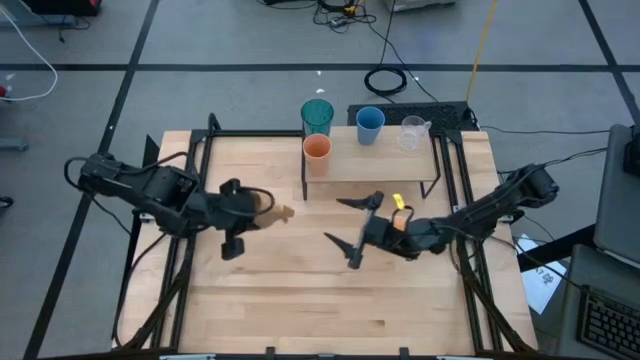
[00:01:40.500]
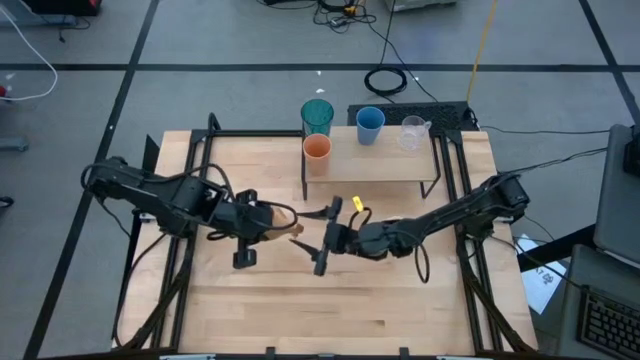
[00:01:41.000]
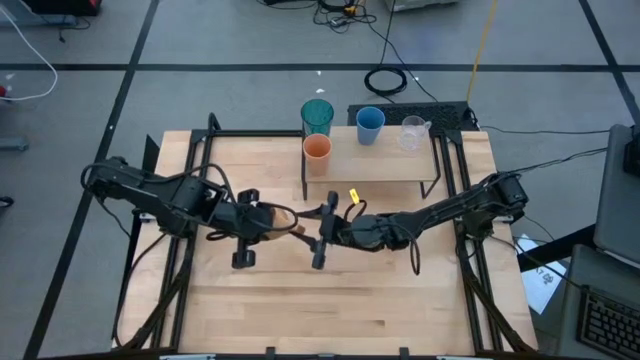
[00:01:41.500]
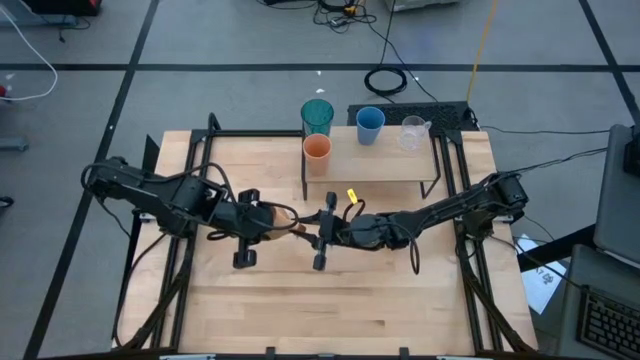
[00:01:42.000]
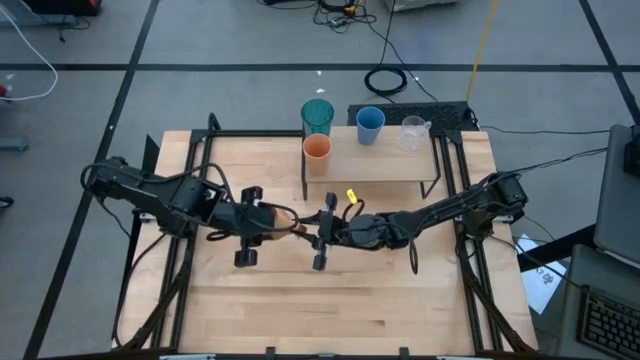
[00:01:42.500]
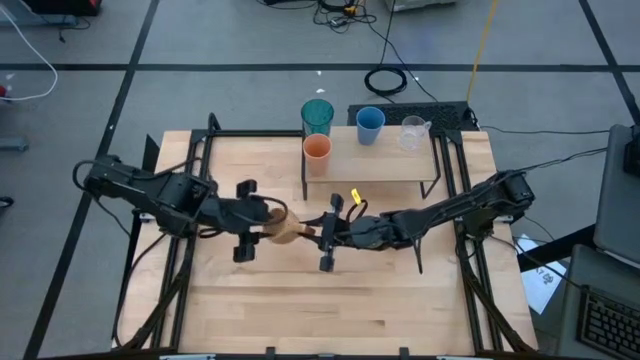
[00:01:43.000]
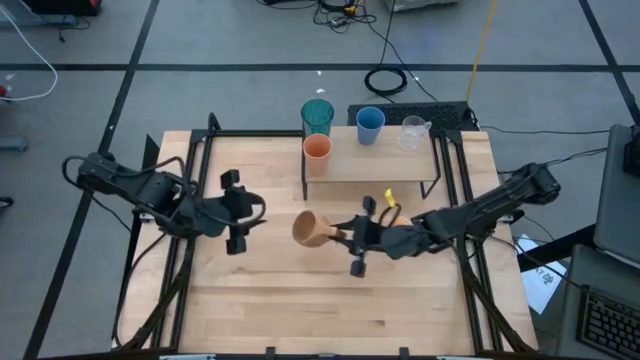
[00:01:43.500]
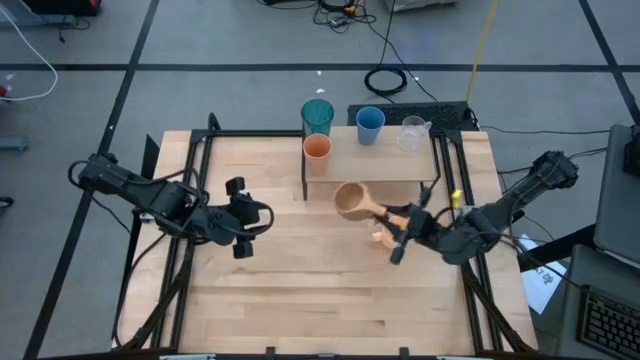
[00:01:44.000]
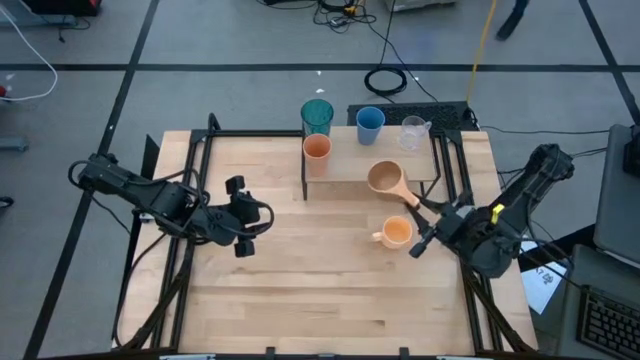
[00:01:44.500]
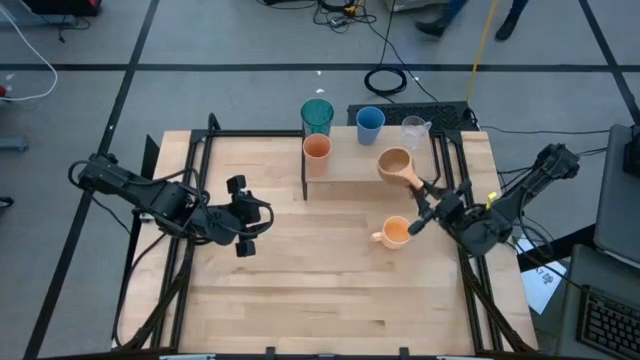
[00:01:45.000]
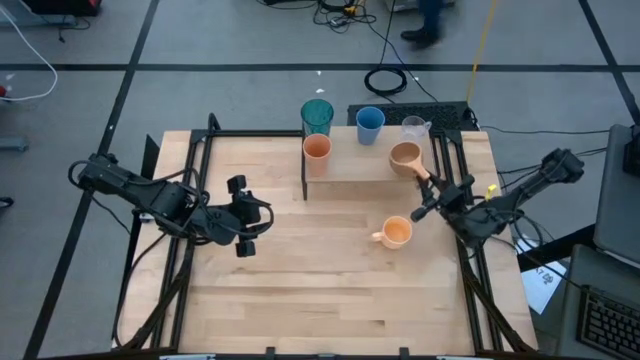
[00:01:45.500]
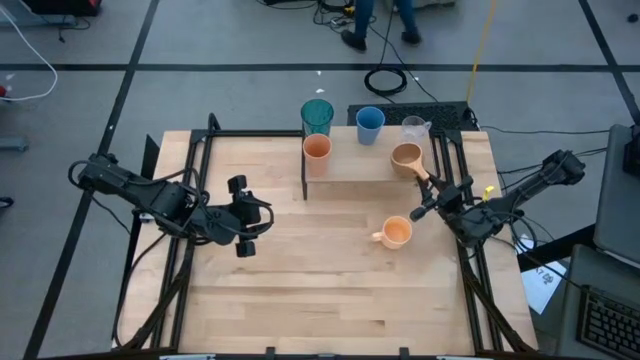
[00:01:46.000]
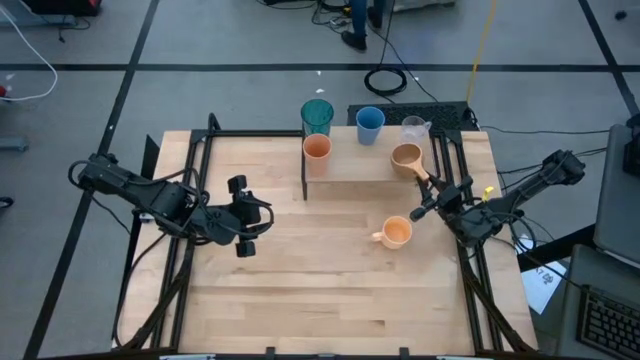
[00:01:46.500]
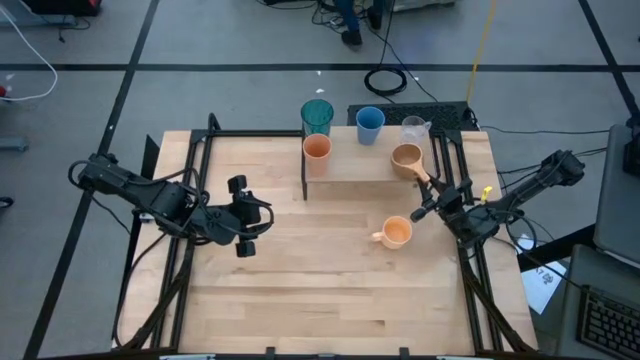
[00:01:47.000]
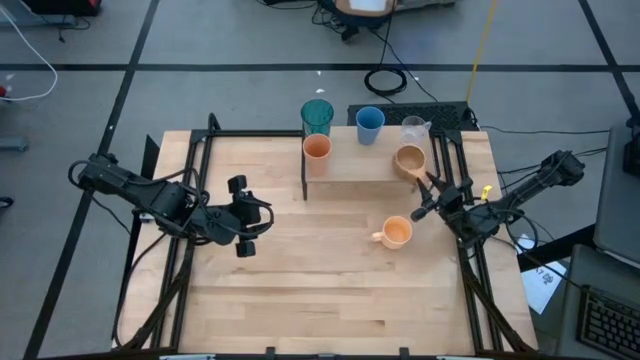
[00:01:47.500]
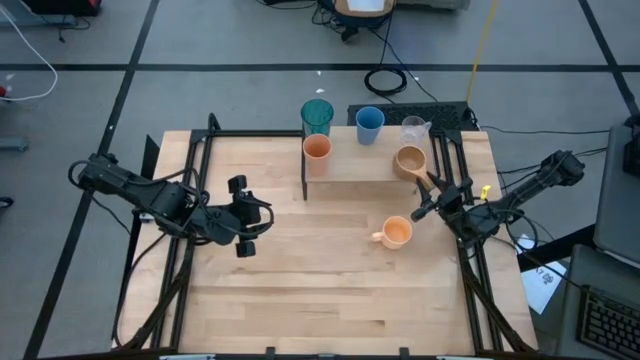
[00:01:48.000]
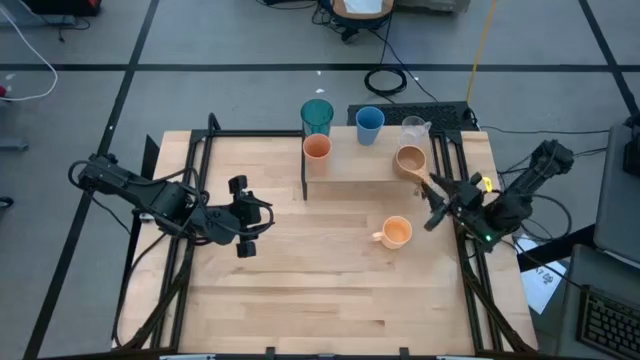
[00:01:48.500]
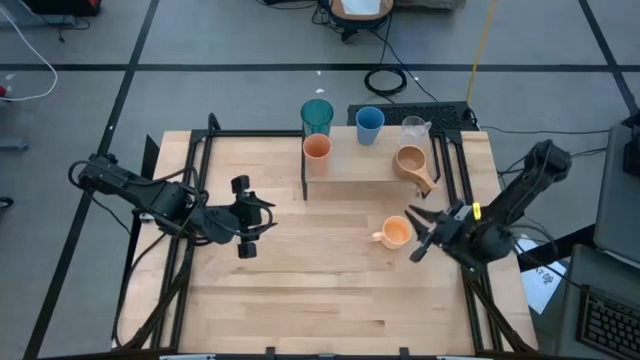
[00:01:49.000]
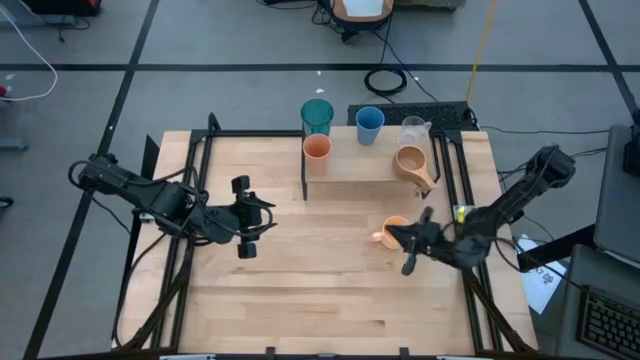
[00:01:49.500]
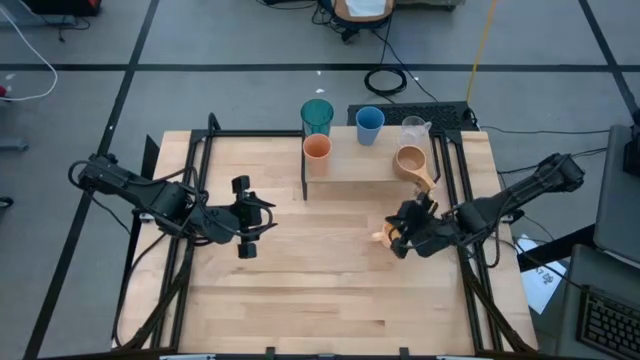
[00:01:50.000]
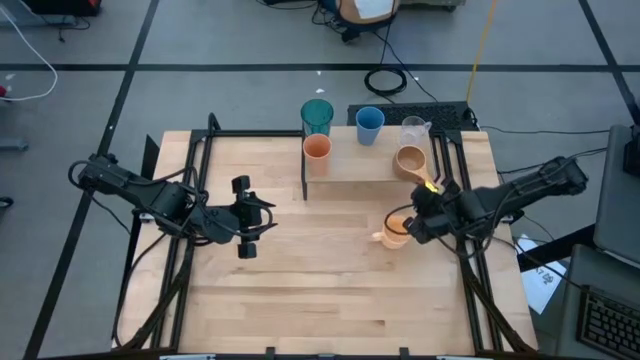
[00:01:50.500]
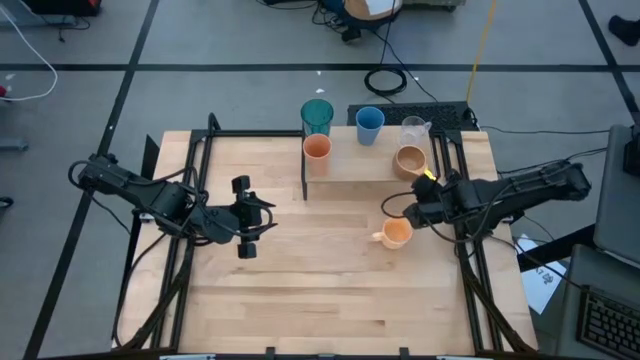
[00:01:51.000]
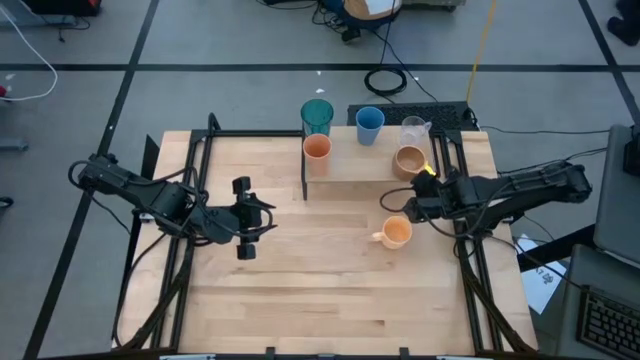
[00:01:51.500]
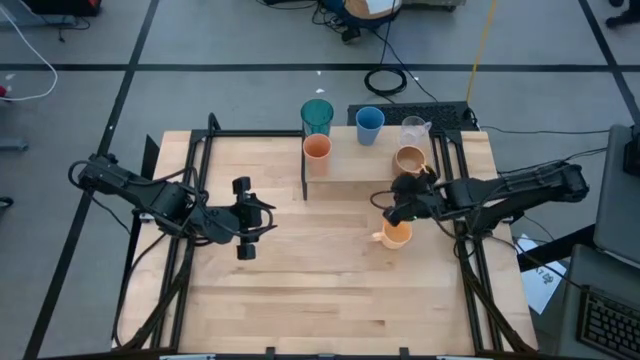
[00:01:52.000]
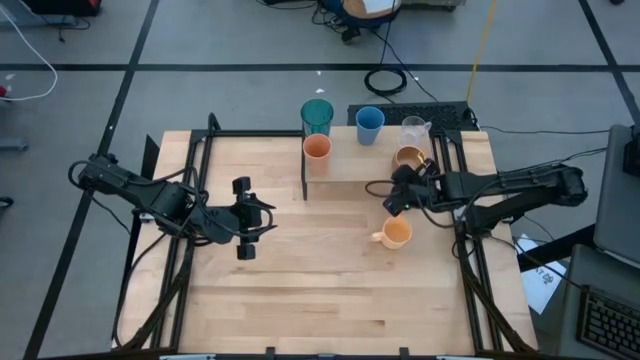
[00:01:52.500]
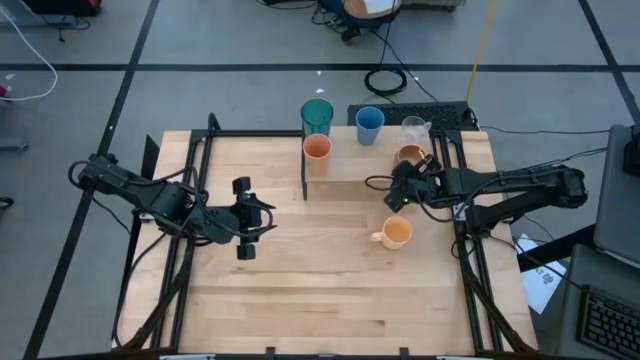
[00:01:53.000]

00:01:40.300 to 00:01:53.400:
Task: Stack small to large cups/mugs on shelf
Put the wooden mug on the shelf
